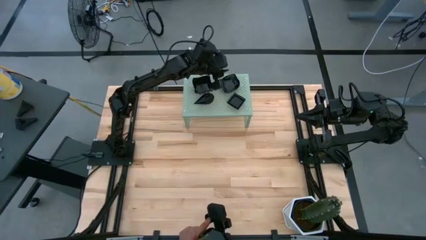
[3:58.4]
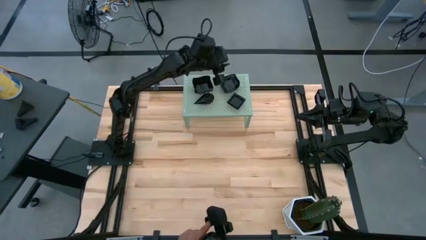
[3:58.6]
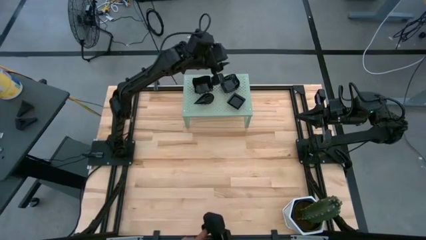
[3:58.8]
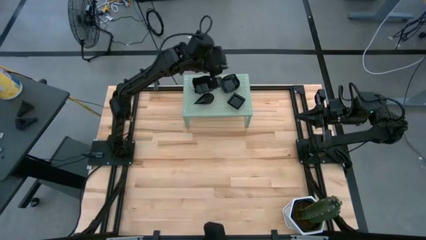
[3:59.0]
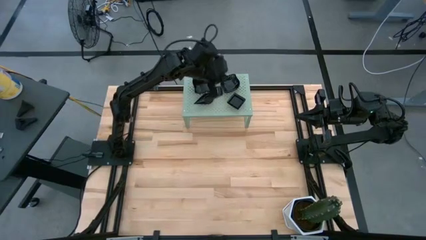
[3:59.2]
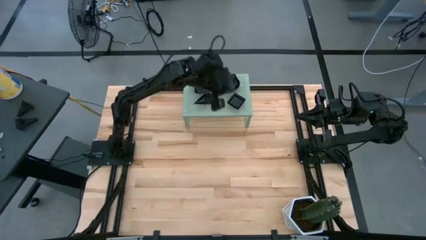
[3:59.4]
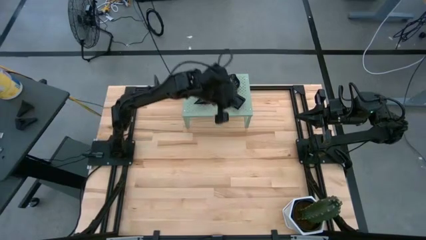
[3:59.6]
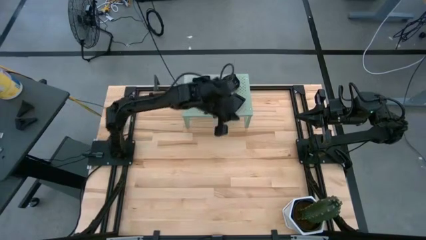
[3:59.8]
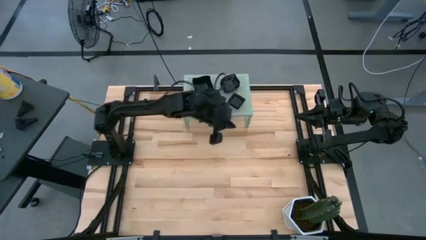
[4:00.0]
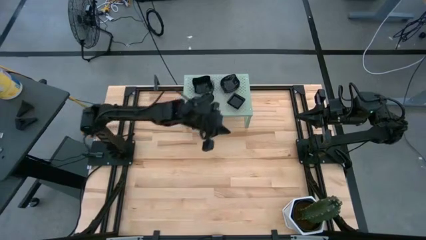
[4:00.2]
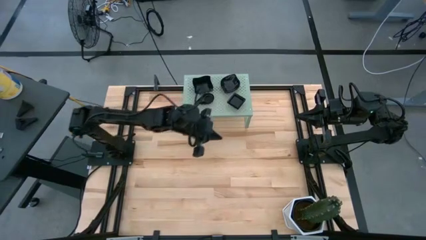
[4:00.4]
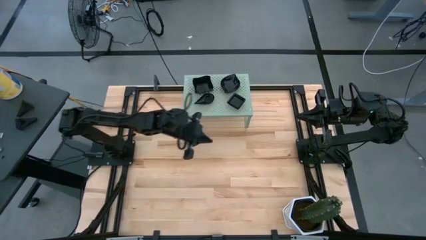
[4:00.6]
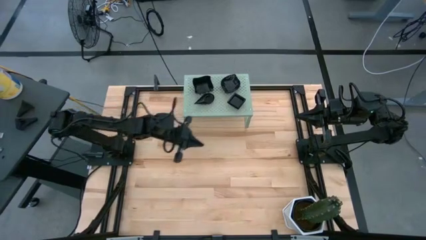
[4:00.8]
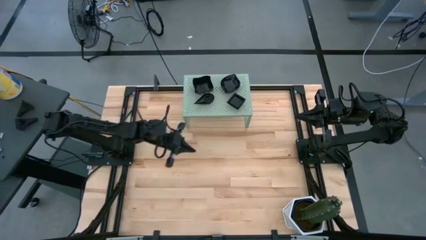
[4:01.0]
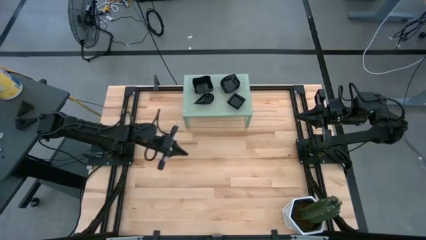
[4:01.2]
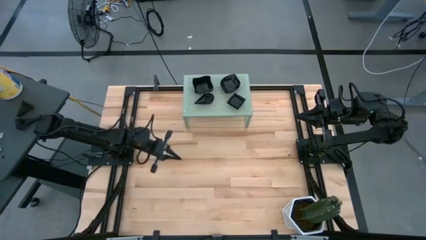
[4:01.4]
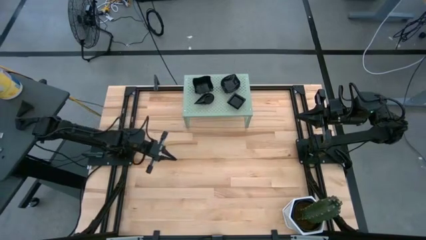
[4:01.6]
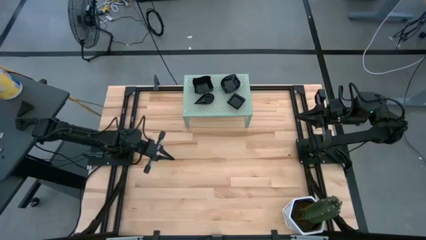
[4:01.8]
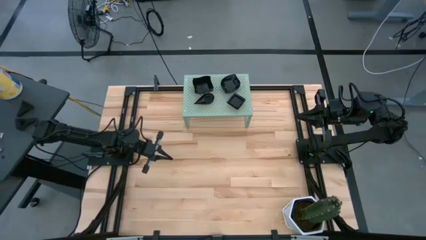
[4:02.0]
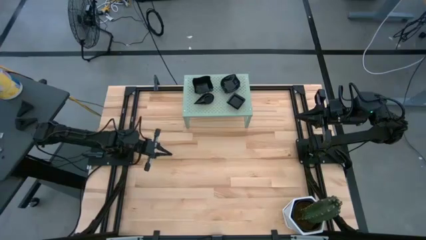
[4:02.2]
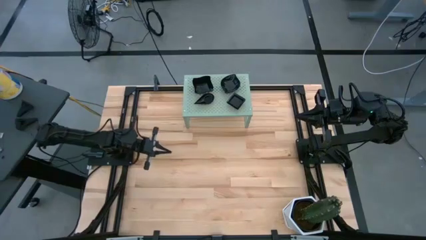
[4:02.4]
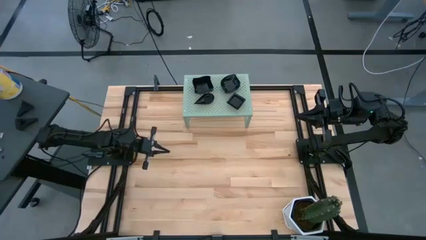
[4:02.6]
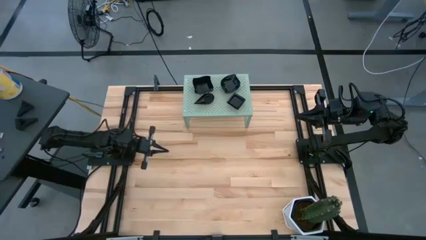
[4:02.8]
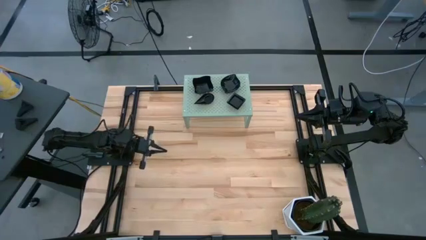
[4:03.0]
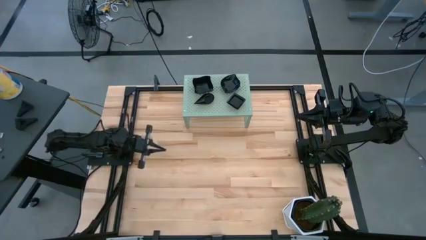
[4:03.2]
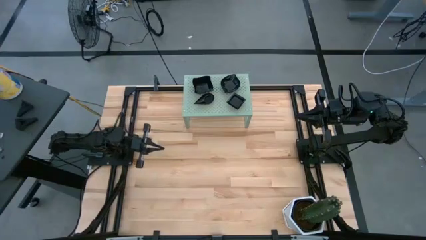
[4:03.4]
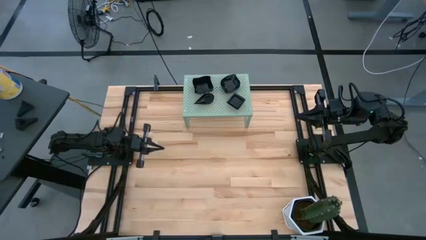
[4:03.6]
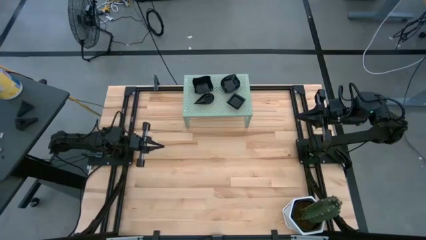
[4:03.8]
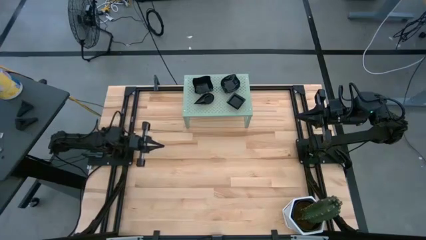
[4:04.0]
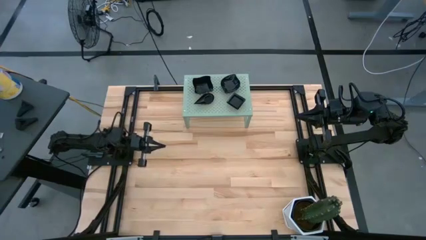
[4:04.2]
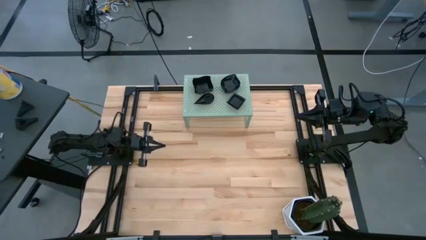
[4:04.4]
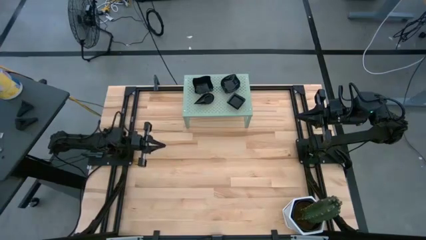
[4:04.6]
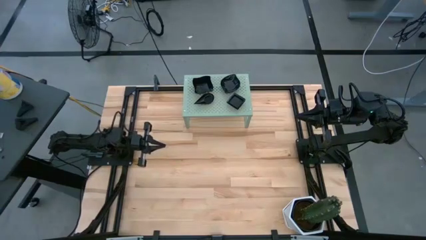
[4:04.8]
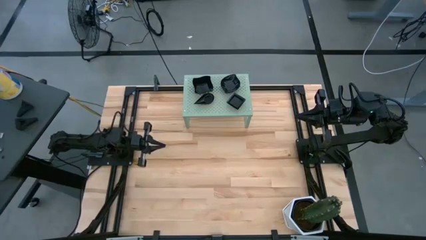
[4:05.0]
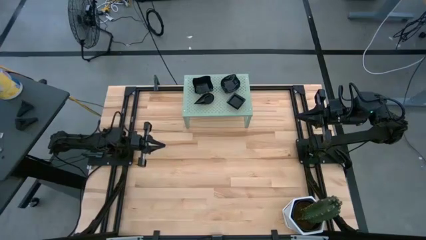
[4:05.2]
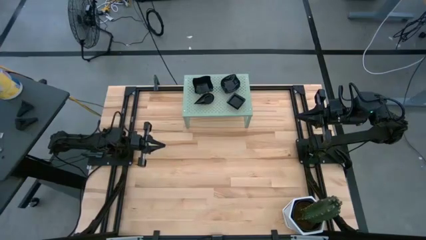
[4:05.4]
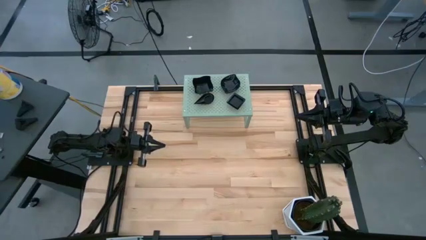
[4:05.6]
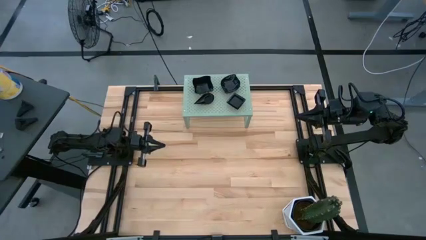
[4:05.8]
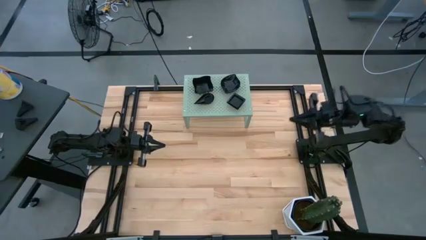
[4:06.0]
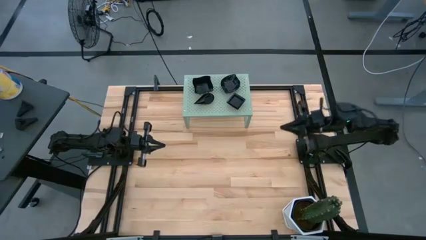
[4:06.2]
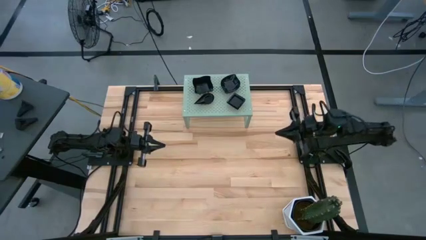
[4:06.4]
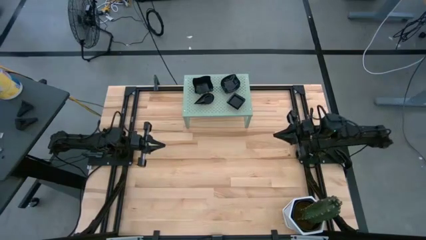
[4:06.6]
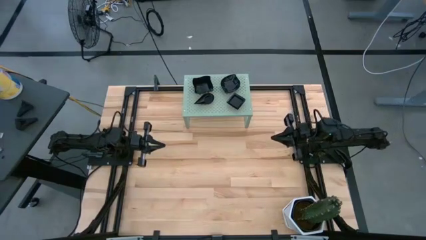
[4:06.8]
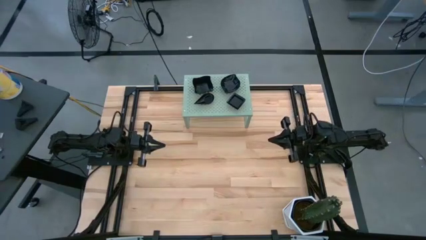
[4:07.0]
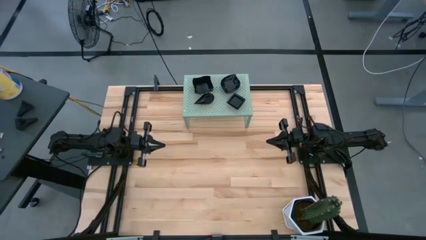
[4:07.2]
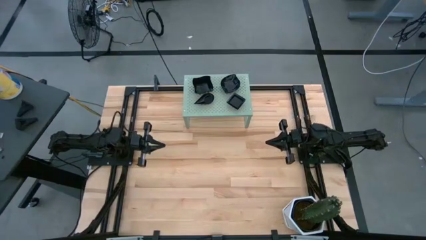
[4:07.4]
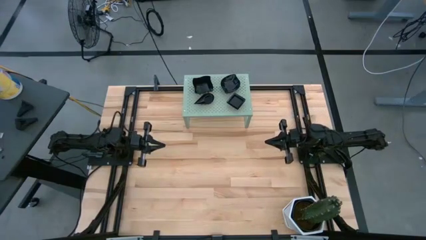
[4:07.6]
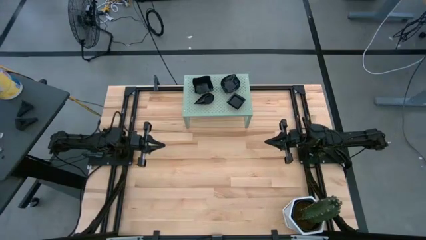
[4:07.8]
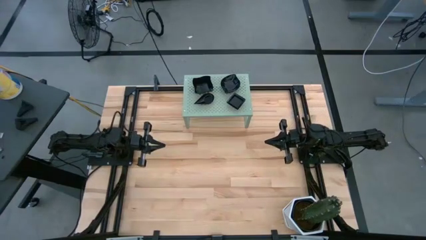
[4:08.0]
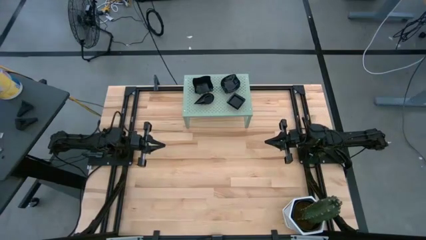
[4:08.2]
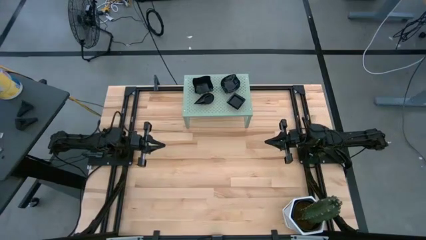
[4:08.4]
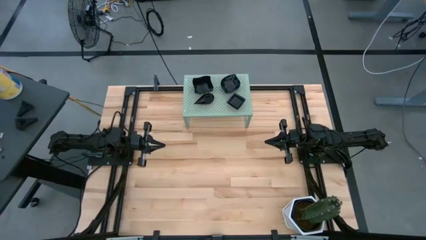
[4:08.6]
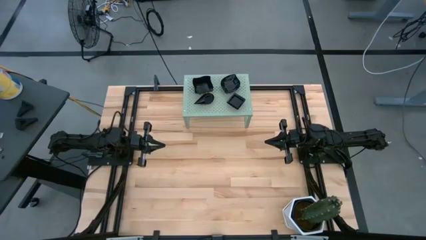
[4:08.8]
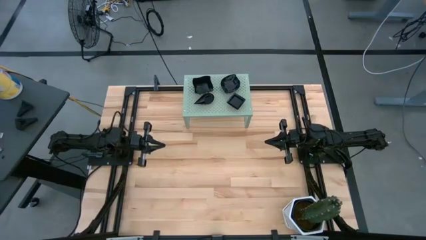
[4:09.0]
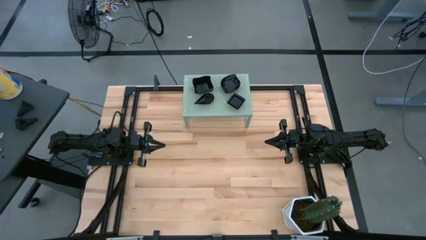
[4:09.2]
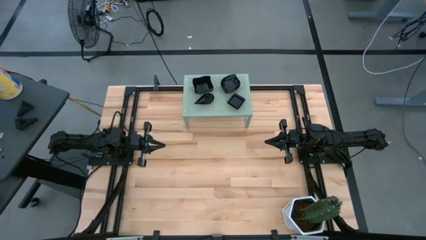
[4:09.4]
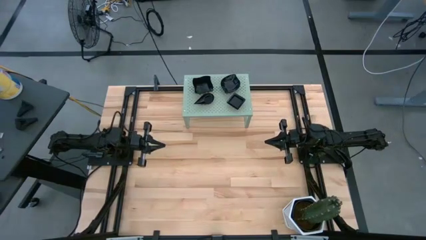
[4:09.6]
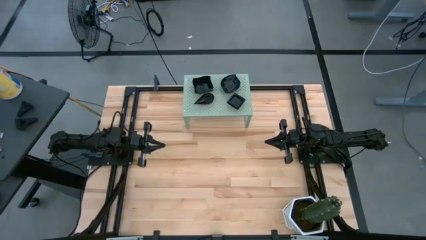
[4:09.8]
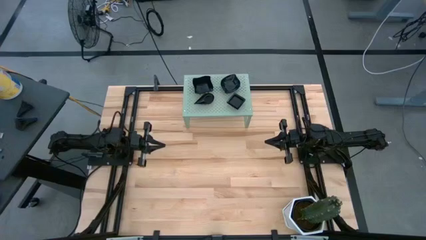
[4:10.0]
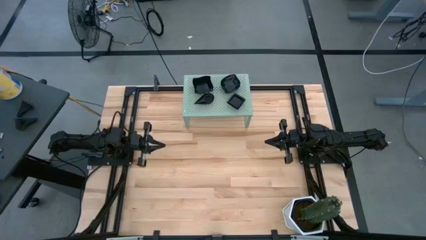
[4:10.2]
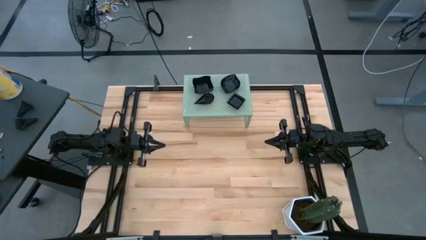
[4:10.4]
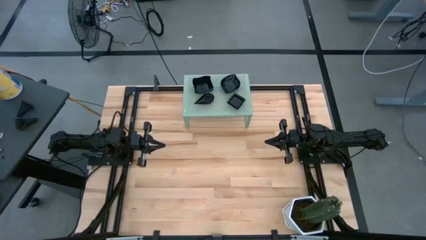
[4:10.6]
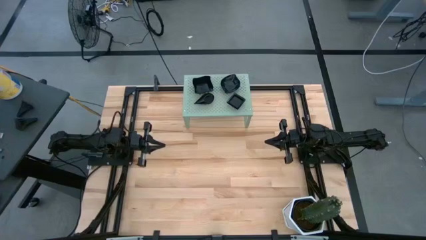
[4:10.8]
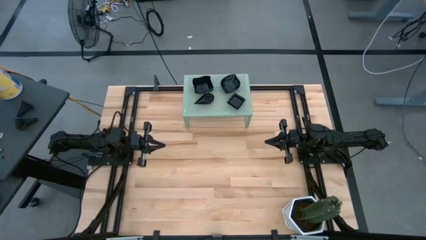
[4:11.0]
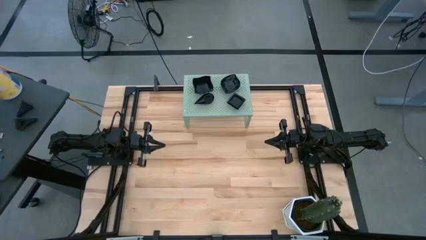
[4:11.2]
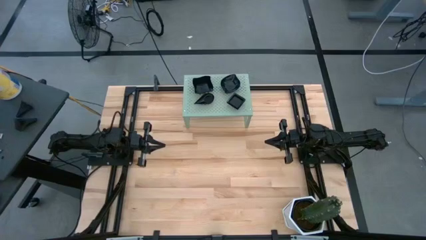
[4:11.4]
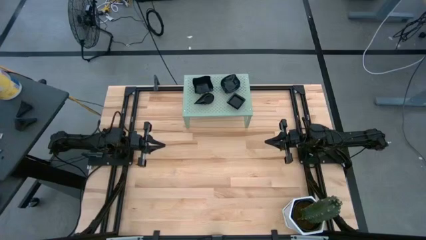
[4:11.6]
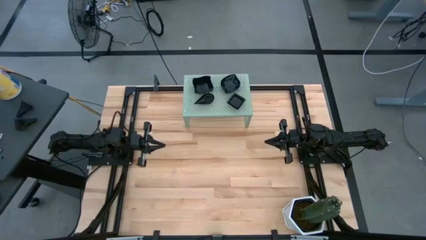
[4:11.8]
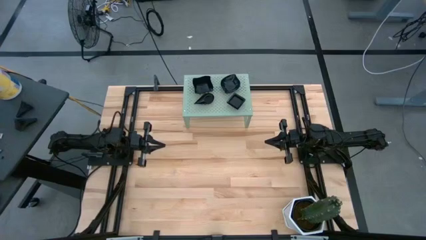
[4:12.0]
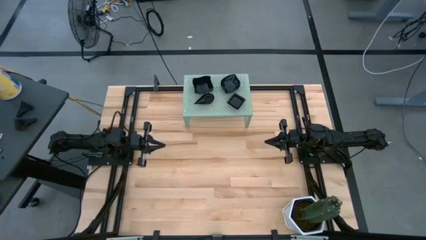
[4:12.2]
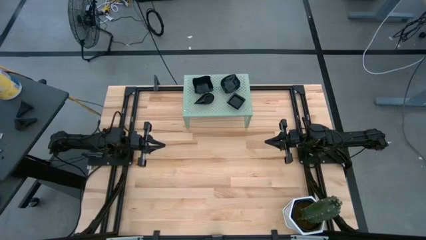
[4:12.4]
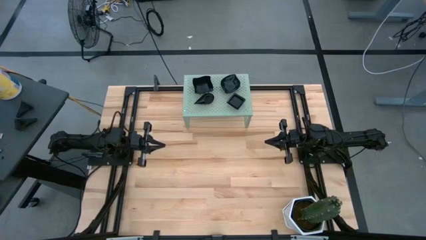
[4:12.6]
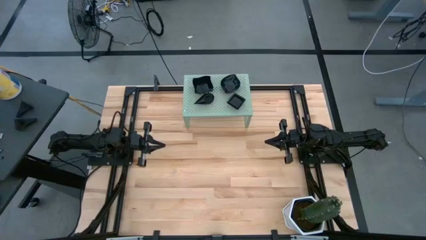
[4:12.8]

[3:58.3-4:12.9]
Task: Pick & Place Mini shaped plates
Return to Home Position

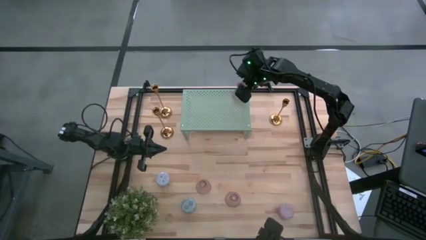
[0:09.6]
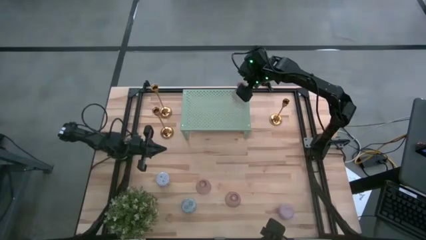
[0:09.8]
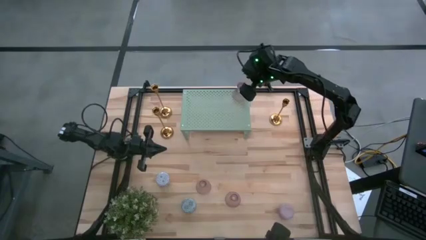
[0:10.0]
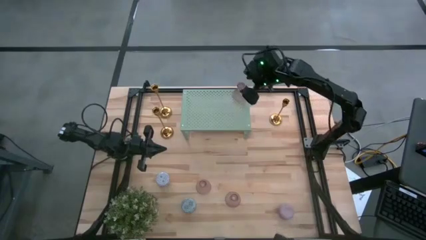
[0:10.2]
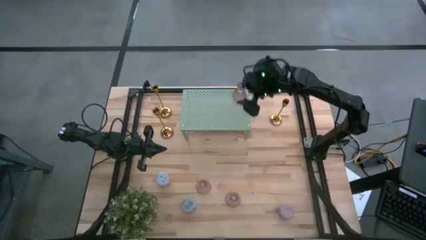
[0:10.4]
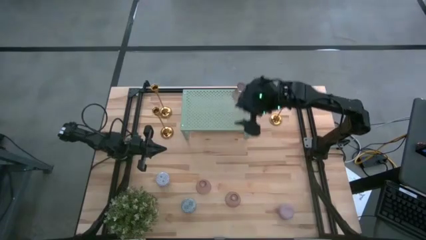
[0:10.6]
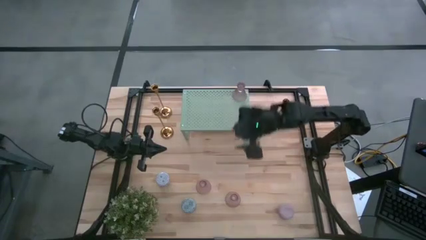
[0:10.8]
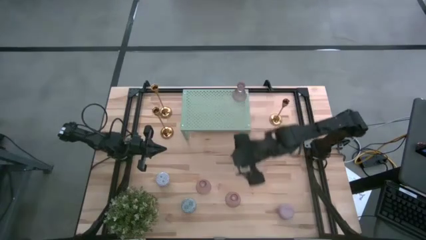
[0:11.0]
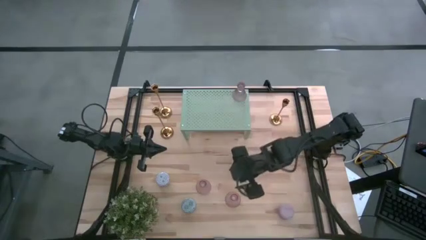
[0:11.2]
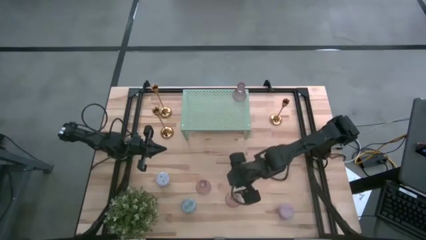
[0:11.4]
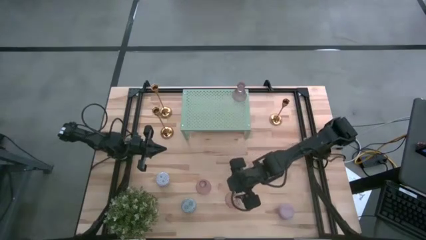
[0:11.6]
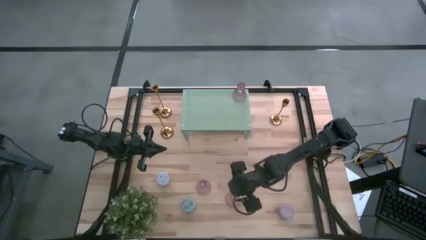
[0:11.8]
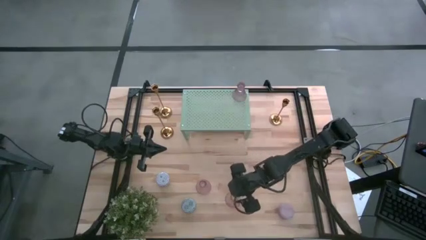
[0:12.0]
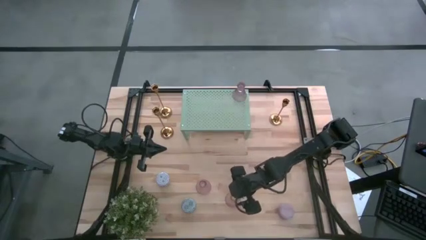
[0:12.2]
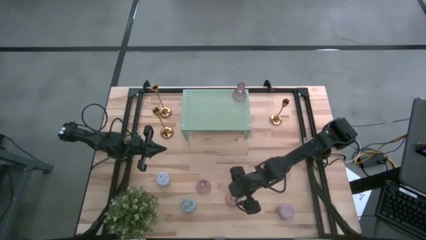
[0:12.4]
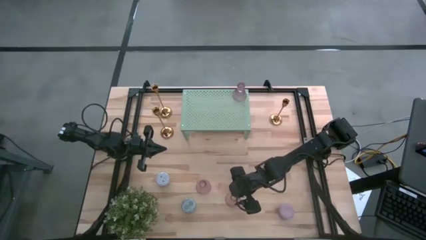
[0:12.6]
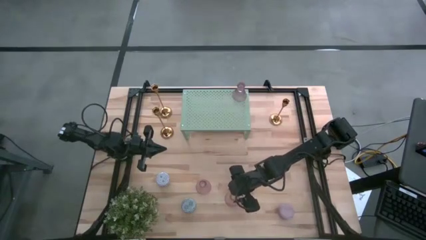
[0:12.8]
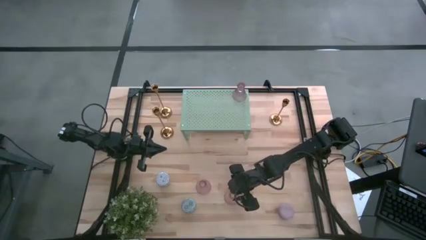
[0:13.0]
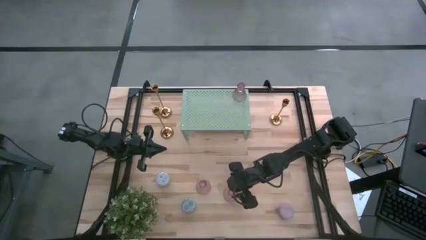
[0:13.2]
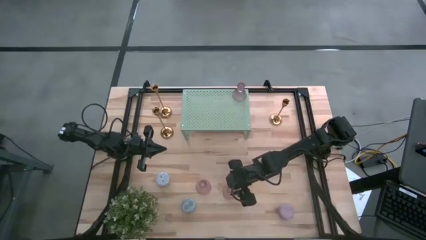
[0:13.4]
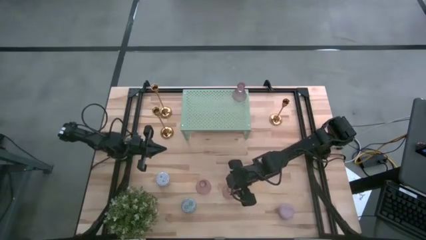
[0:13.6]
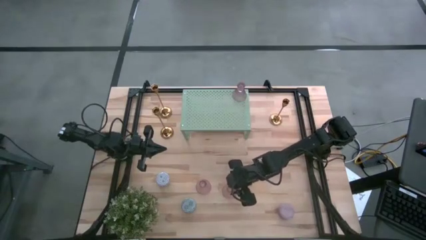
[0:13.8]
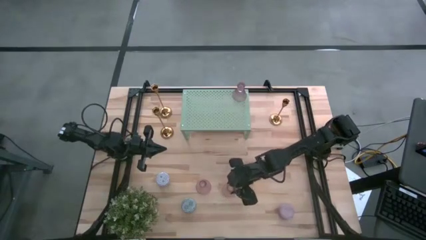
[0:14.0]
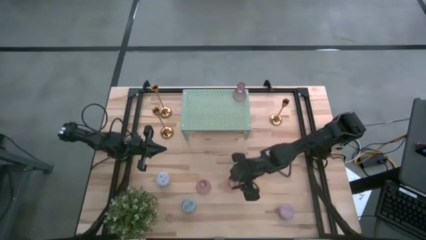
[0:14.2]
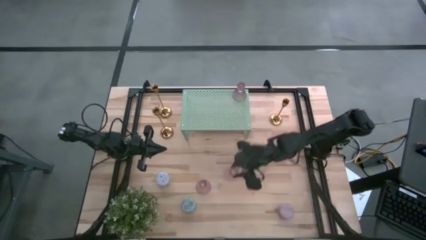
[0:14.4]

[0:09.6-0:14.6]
Task: Pick & Place candle stick holders
Put the top glass candle holder on the shelf aligned with the other glass candle holder
